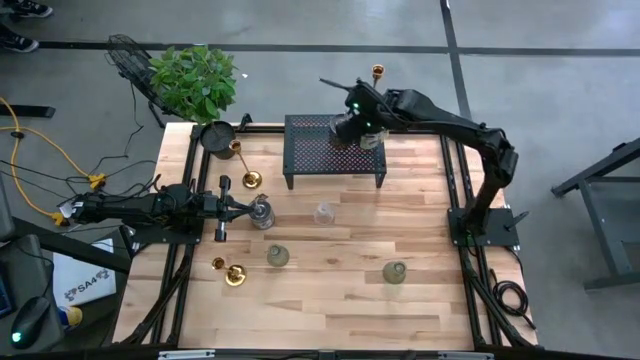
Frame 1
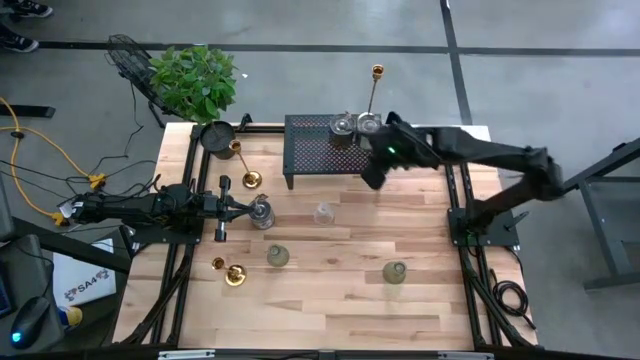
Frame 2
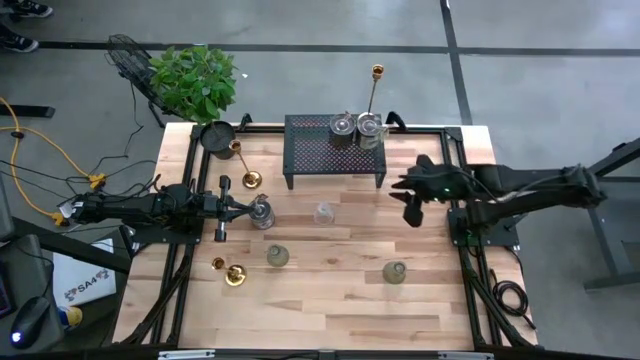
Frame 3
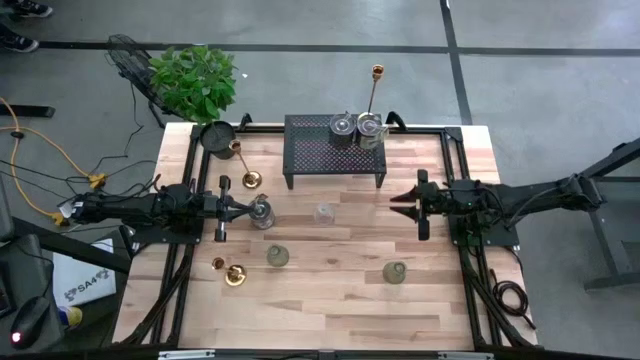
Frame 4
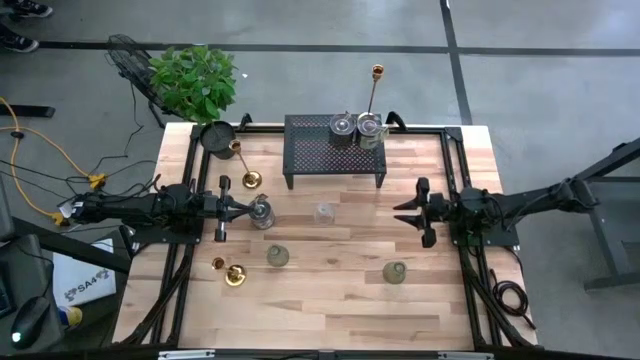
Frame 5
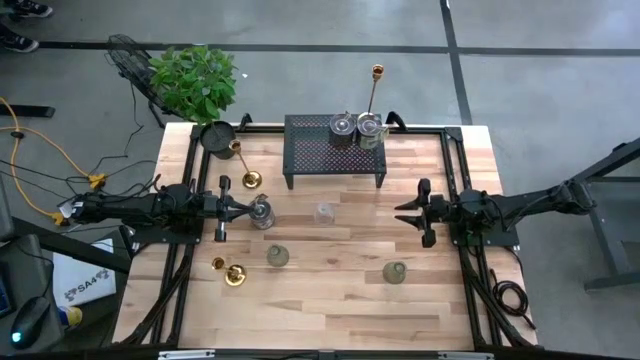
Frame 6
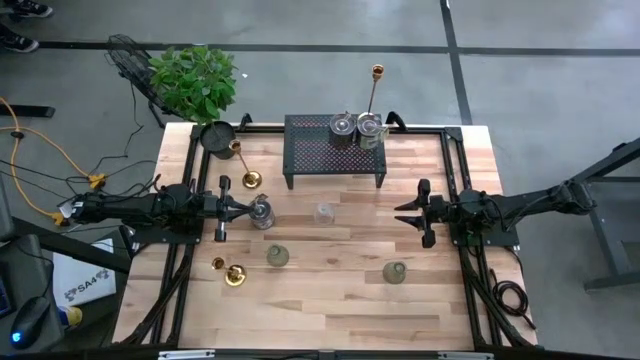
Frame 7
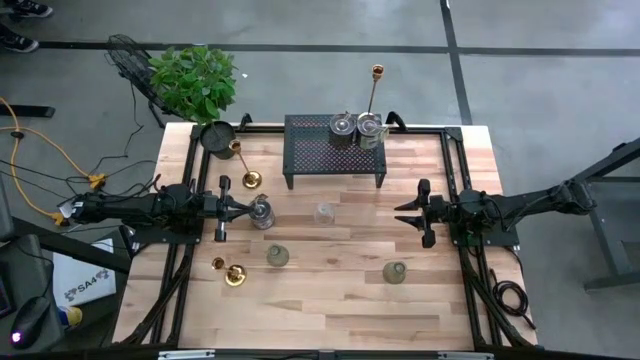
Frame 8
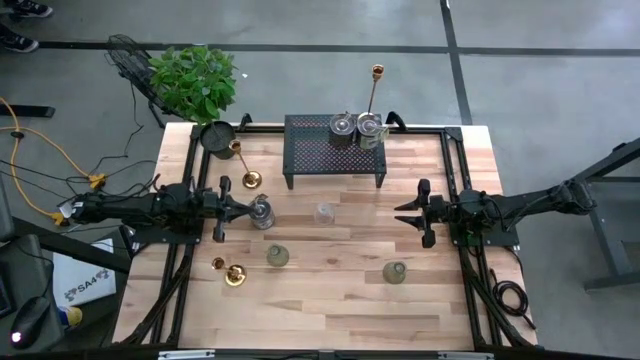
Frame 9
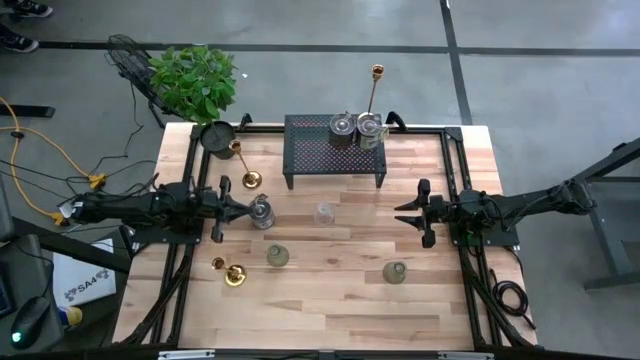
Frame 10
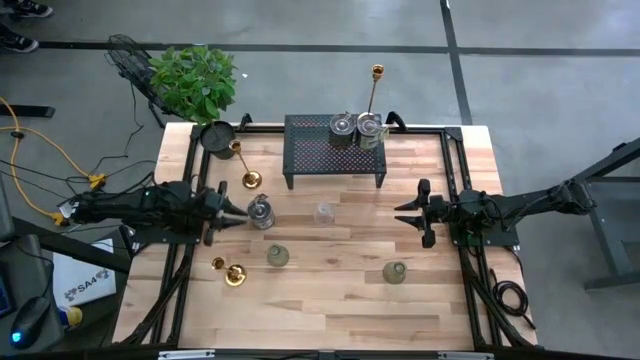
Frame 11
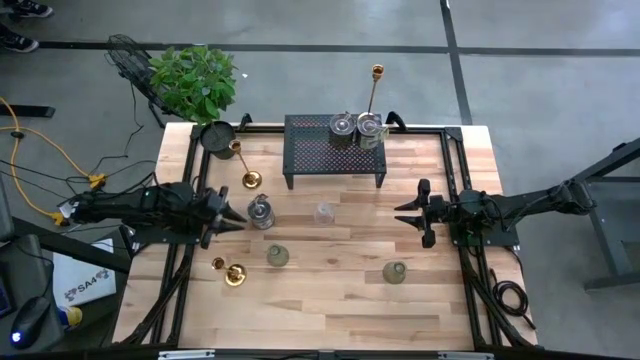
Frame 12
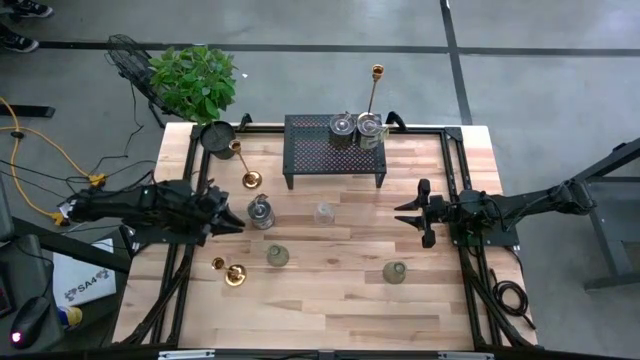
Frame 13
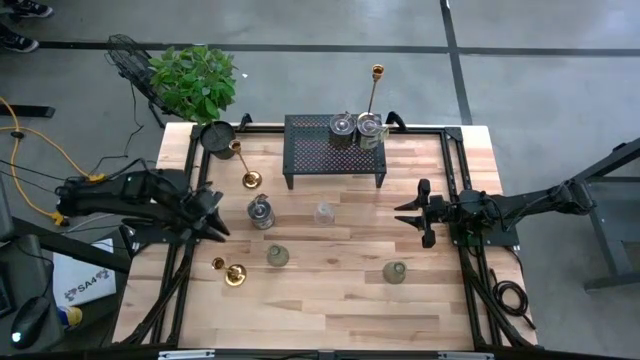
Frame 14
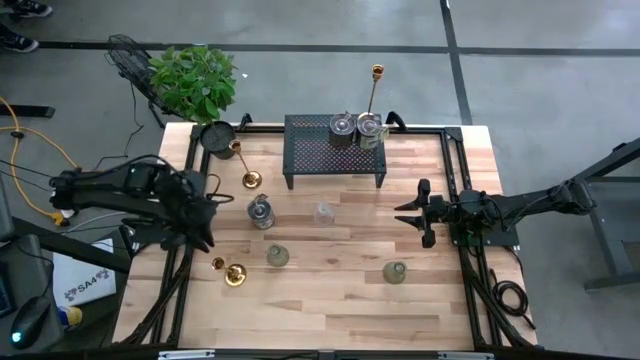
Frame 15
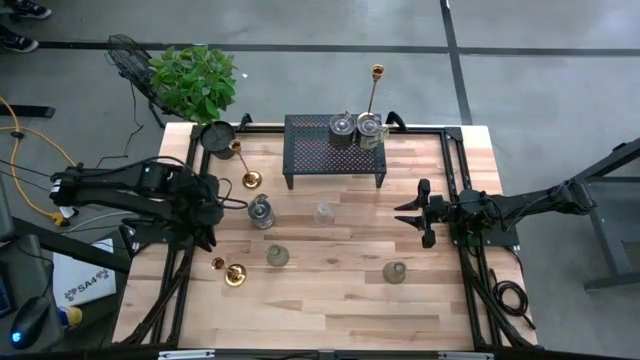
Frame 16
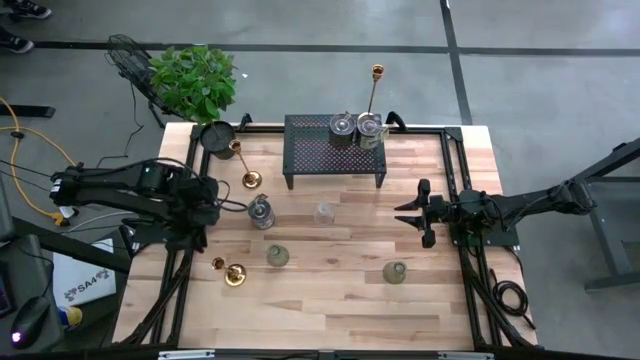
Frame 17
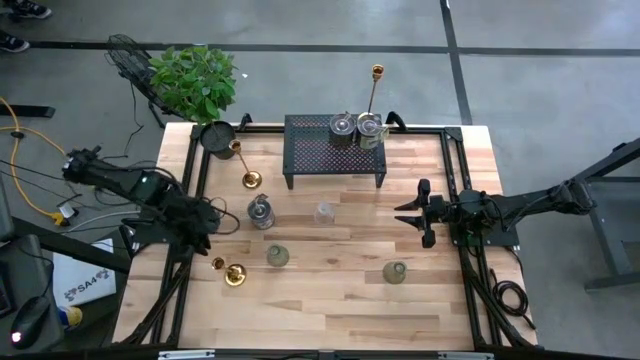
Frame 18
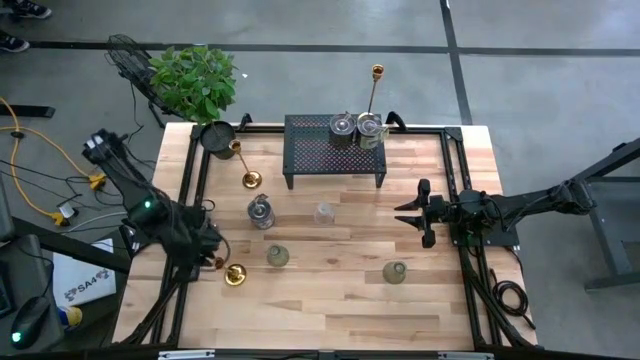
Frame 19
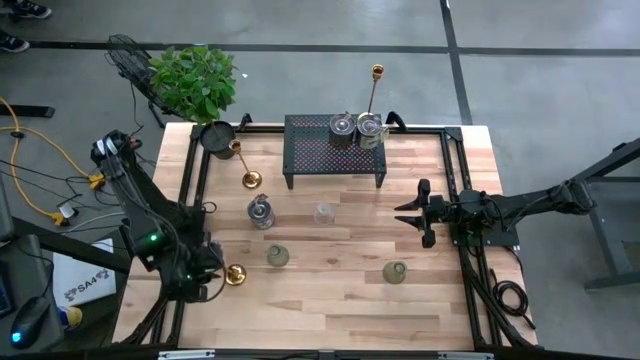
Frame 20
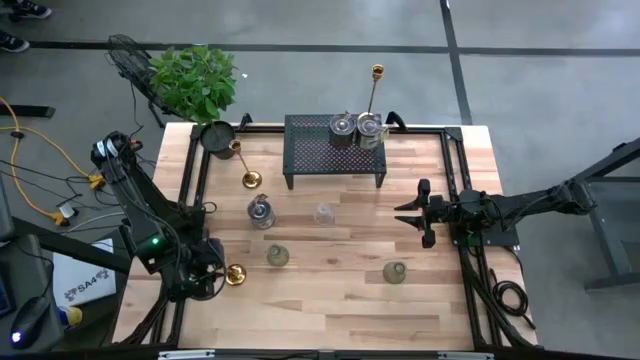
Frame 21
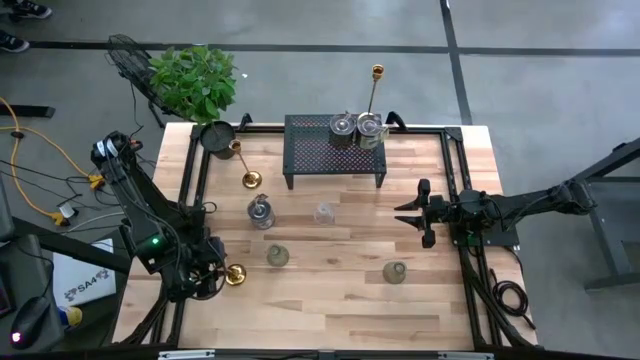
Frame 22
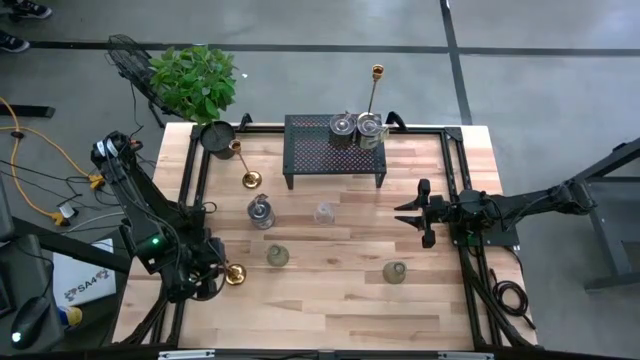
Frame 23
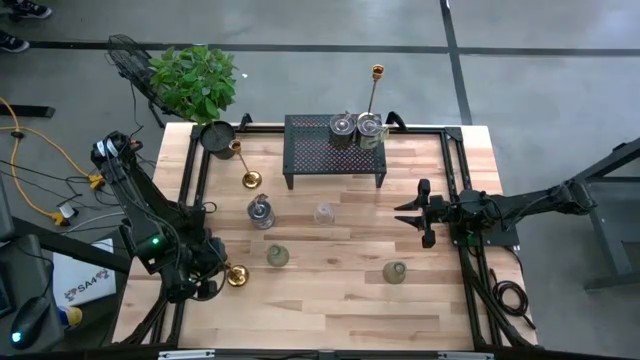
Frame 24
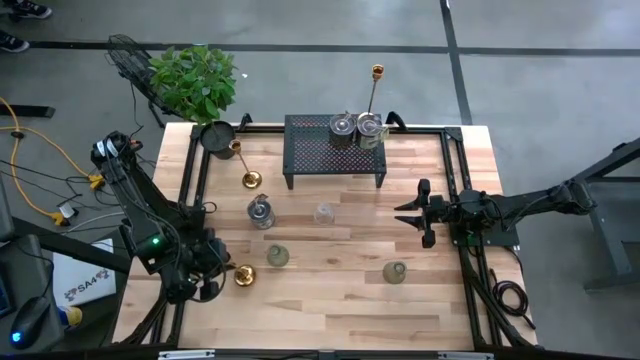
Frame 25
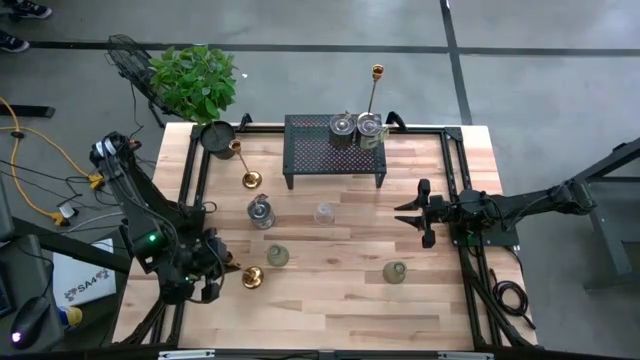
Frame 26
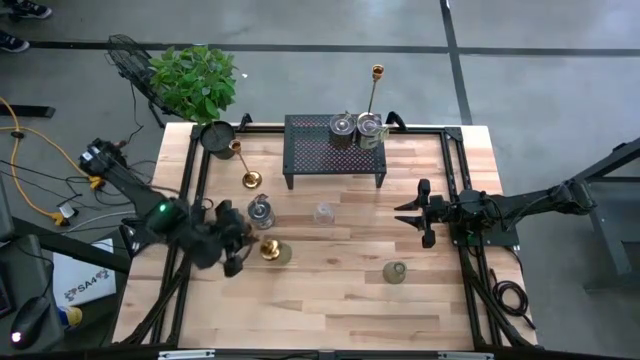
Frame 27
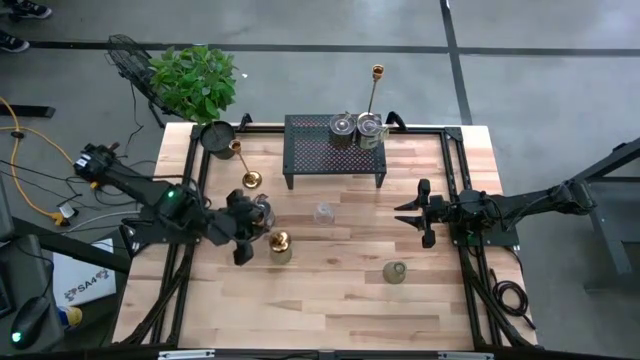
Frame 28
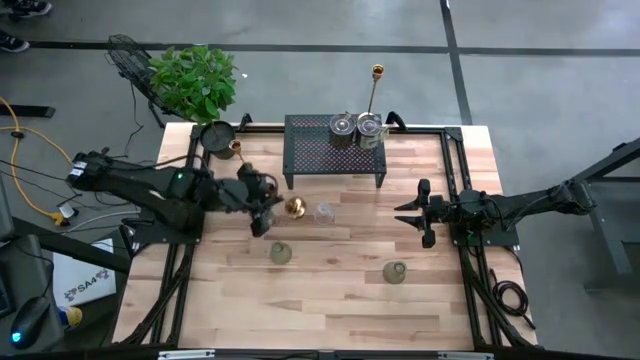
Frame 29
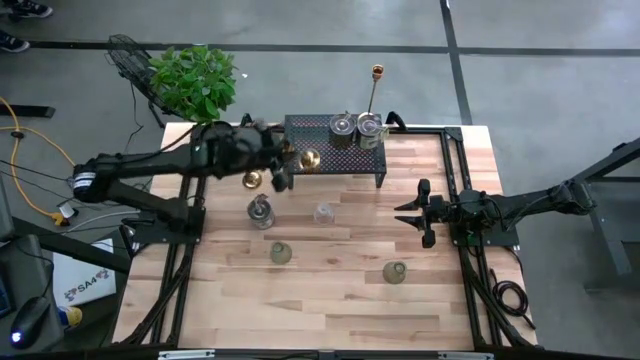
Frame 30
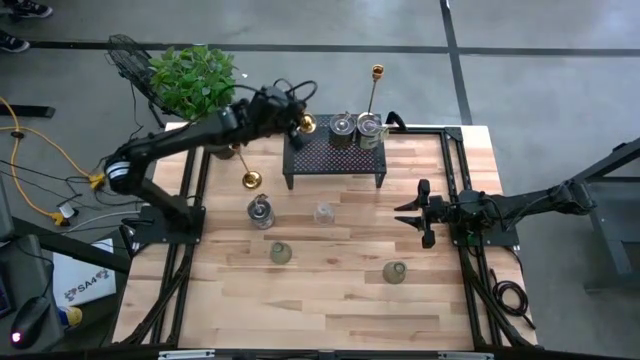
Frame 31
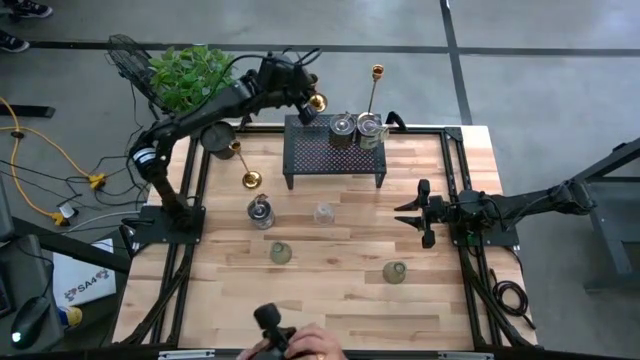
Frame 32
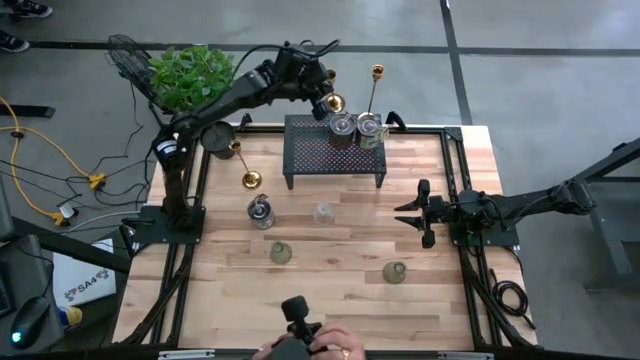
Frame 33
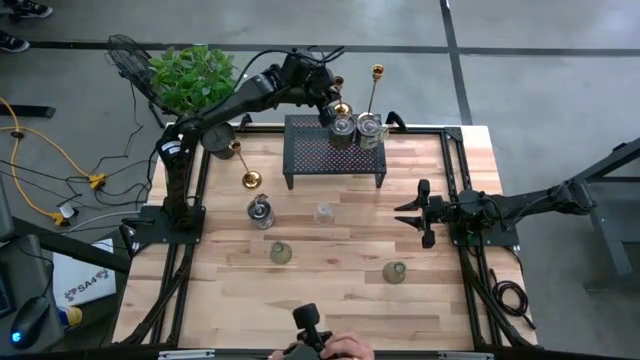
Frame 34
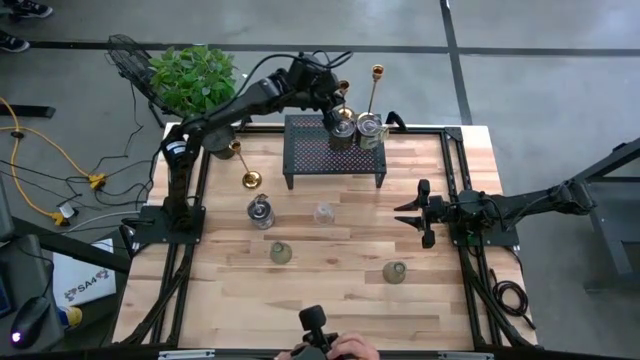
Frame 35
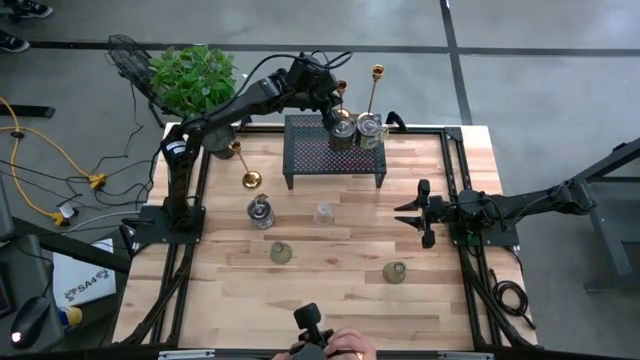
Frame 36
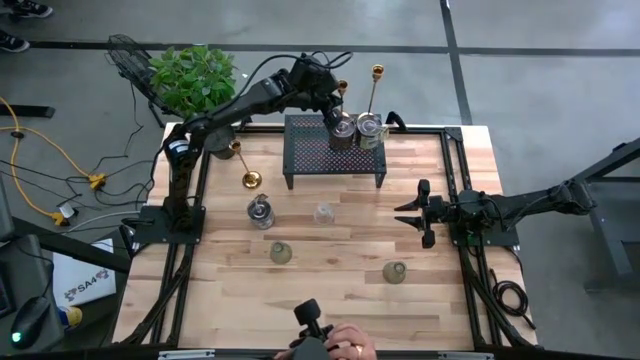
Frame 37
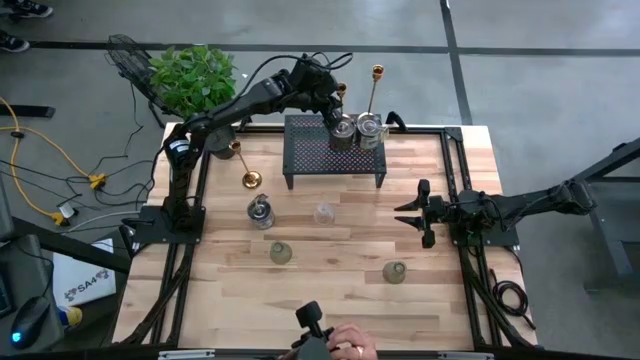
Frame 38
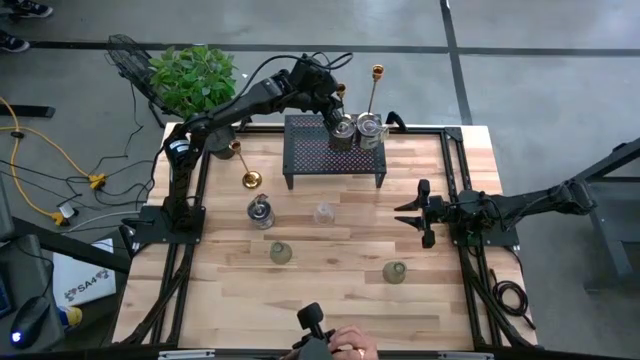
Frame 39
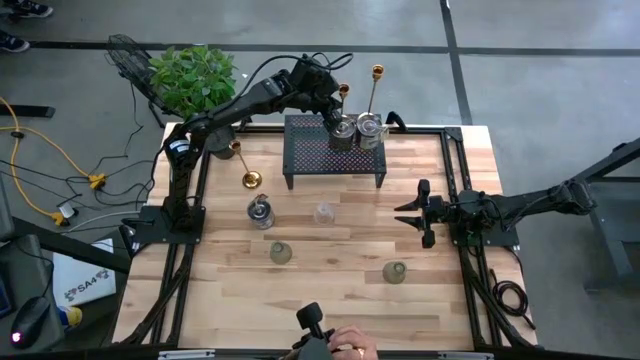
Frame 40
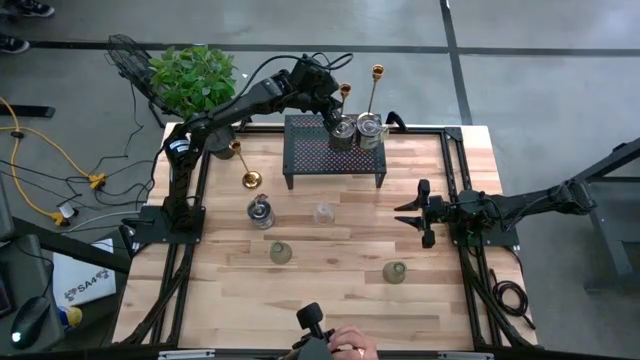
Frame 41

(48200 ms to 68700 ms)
Task: Pick & Place candle stick holders
Put the bottom gold candle holder on the shelf aligned with the other gold candle holder on the shelf

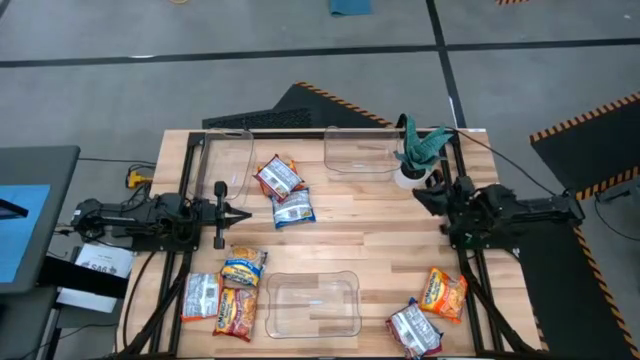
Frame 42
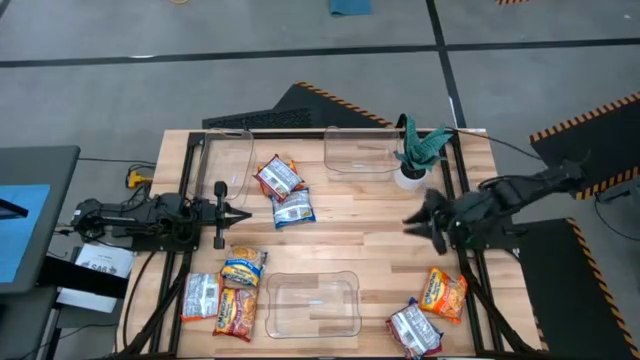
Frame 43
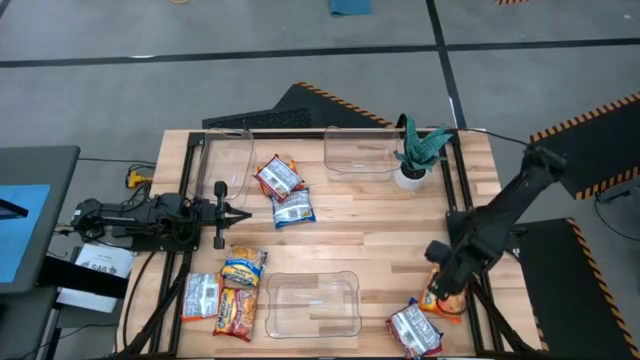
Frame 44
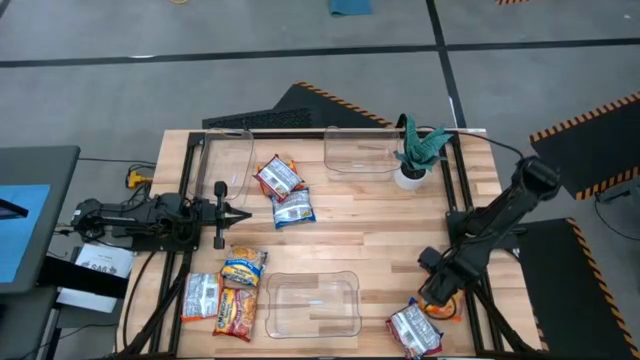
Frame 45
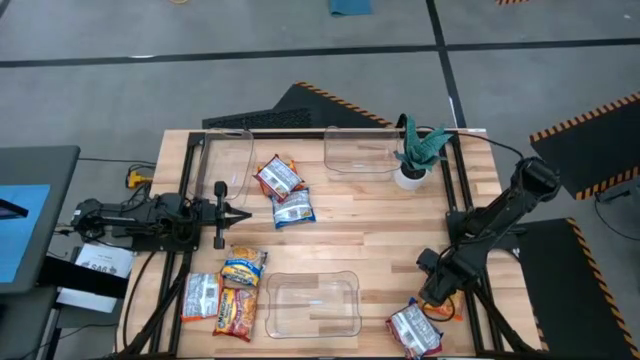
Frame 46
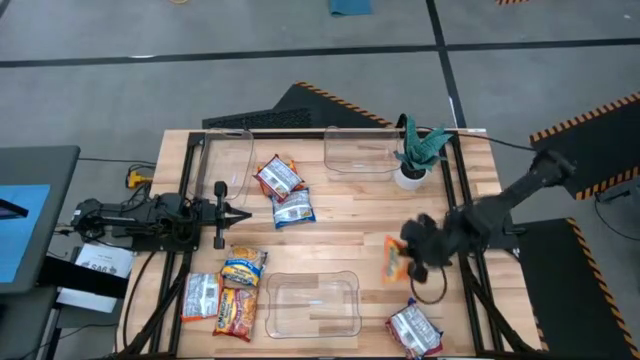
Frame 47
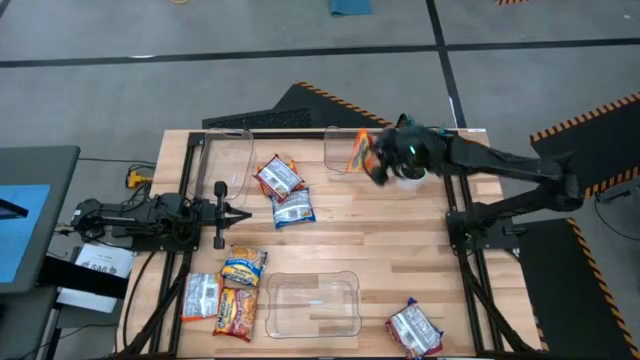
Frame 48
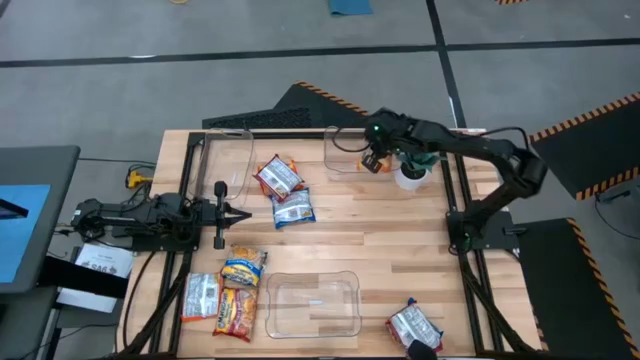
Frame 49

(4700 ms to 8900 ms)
Task: Sort Maruchan noodles
Put the bottom right orange noodle pack into the top right transparent bin
